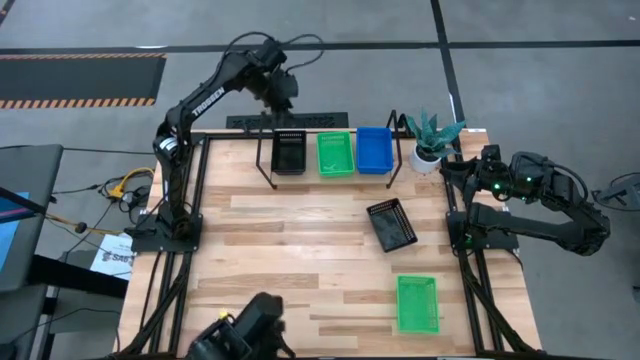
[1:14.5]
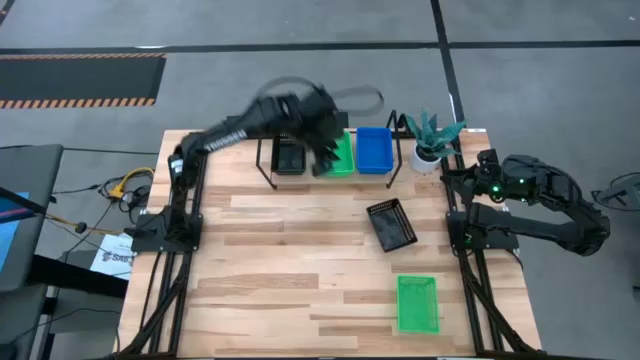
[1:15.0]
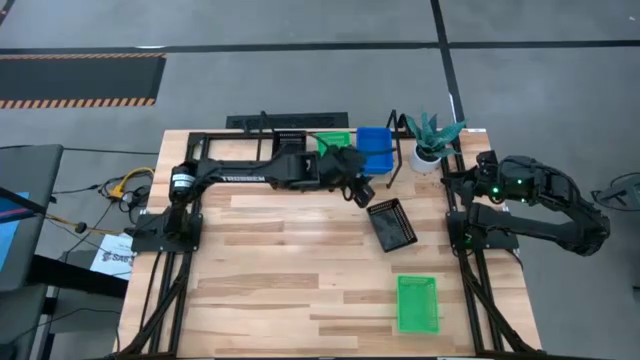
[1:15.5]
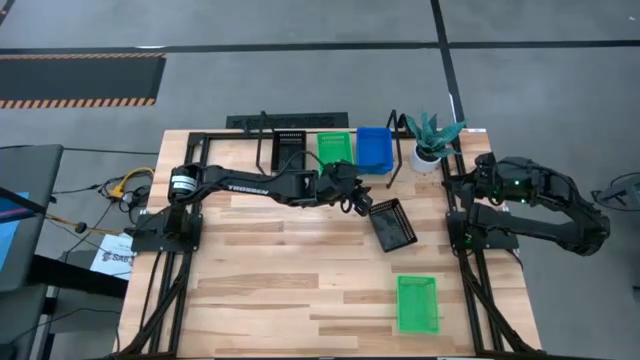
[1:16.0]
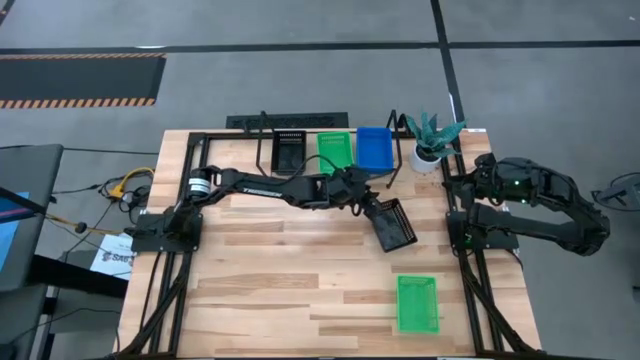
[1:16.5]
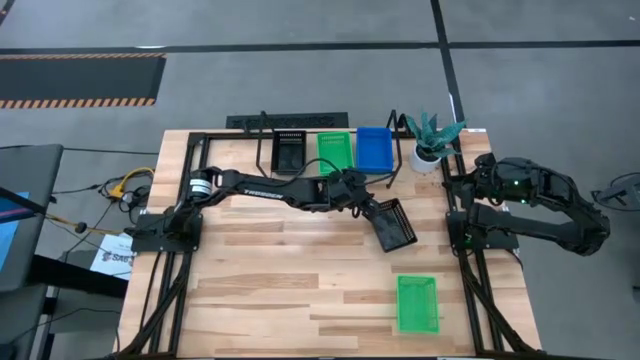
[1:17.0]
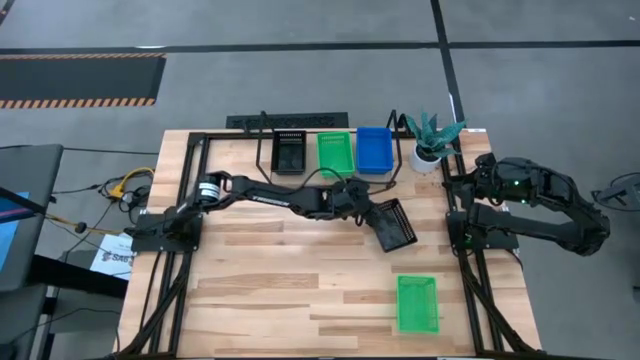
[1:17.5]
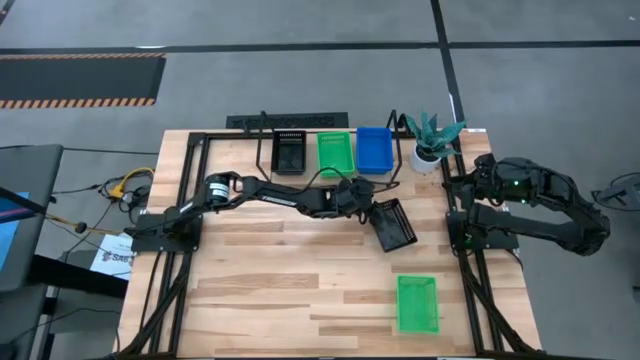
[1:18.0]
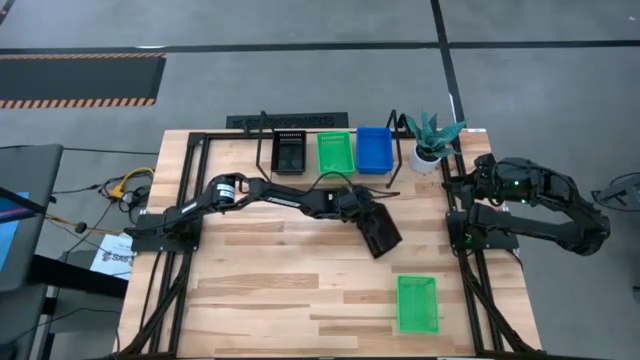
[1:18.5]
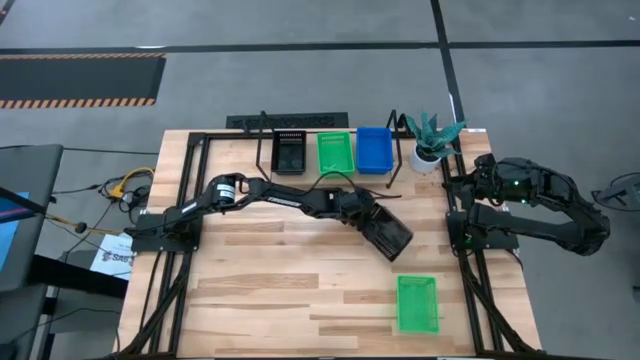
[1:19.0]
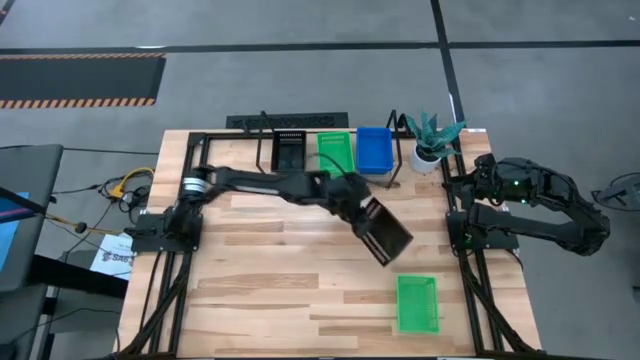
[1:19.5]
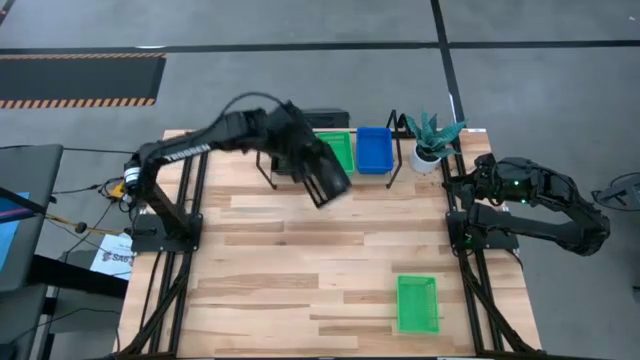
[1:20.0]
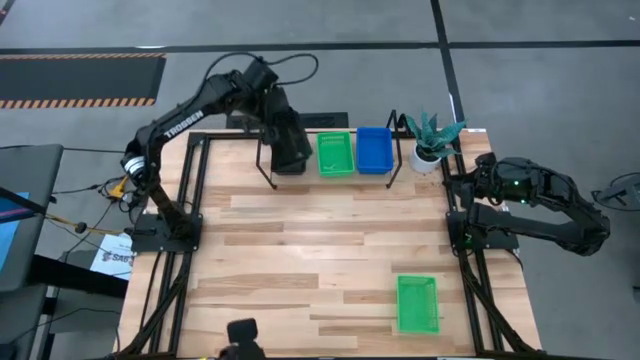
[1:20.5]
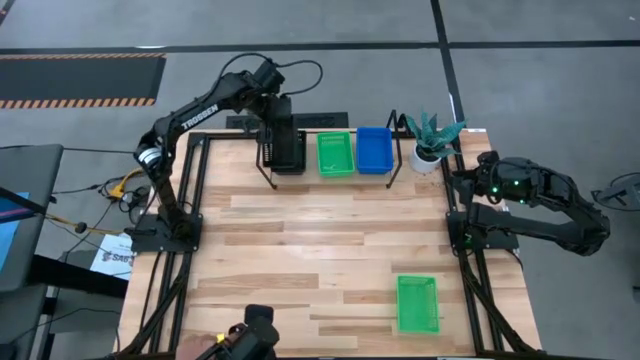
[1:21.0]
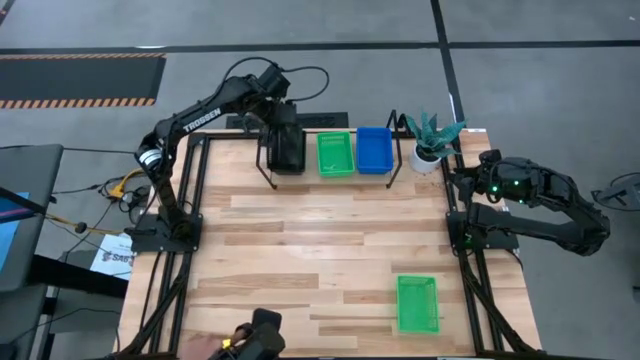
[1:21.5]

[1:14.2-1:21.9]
Task: Stack baskets on shelf by color
Stack the black bin on top of the other black bins on the shelf

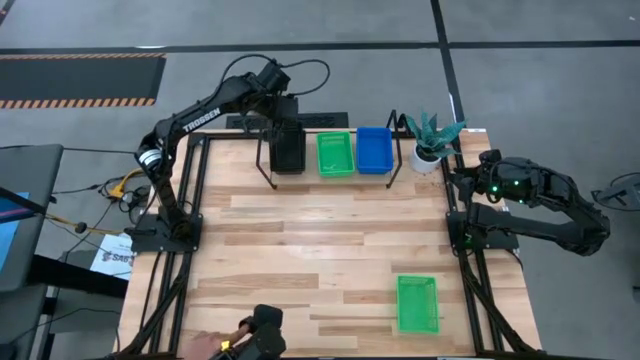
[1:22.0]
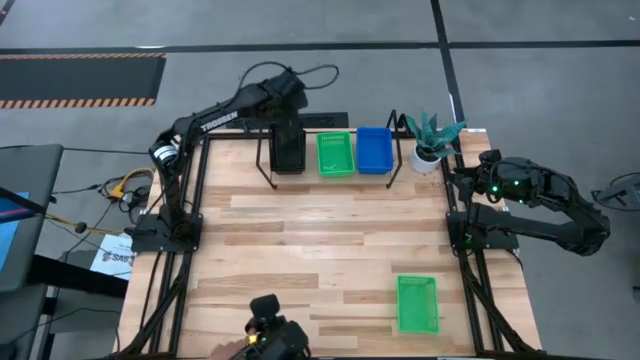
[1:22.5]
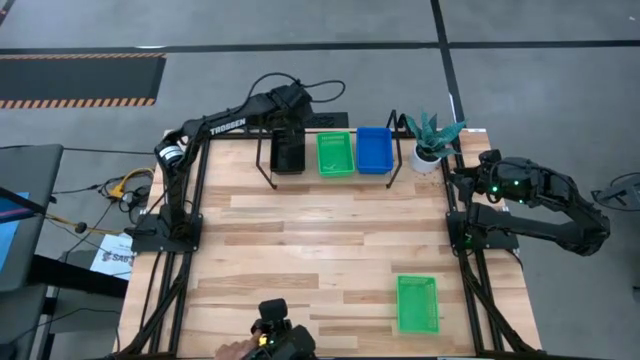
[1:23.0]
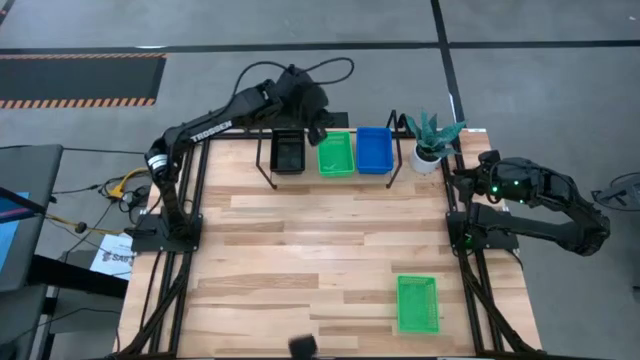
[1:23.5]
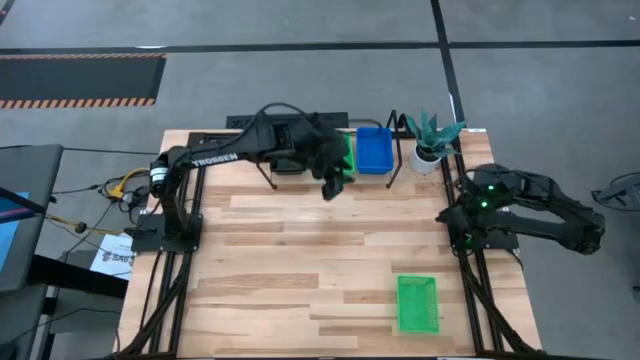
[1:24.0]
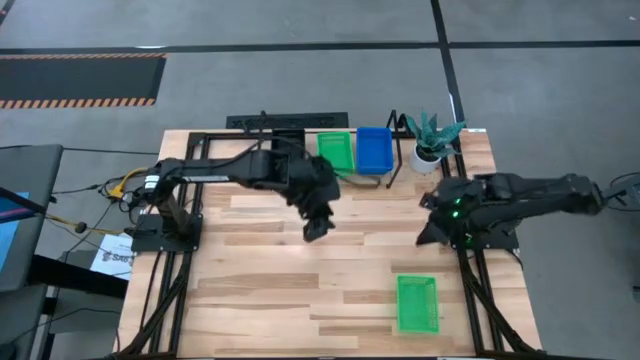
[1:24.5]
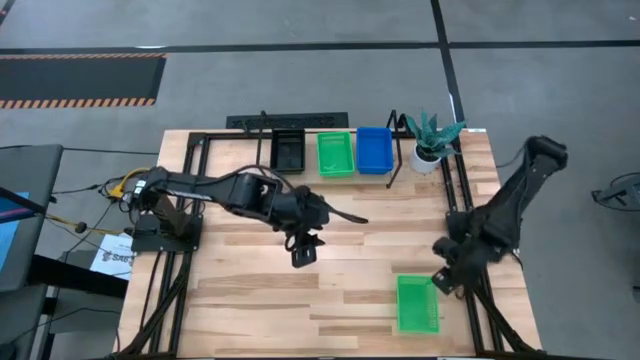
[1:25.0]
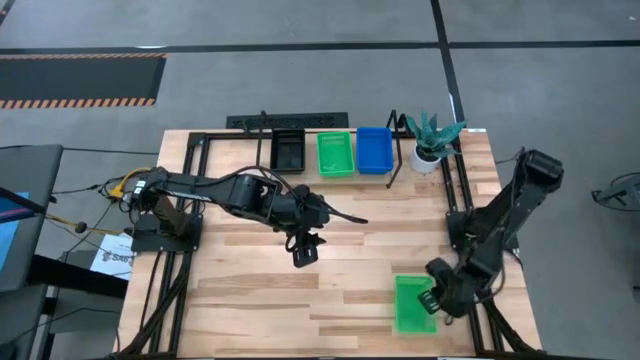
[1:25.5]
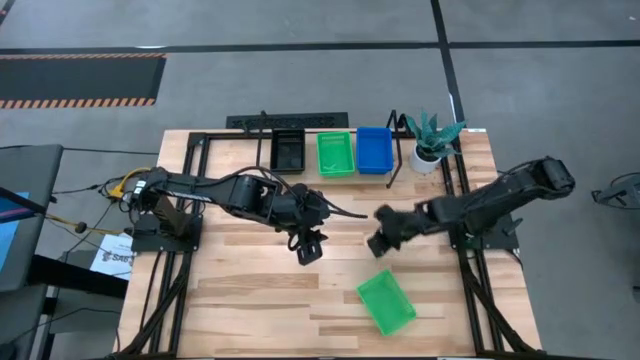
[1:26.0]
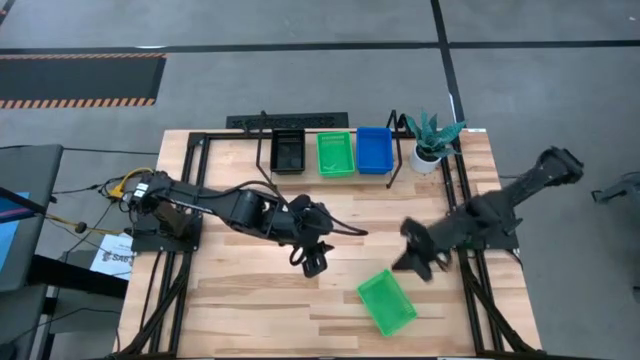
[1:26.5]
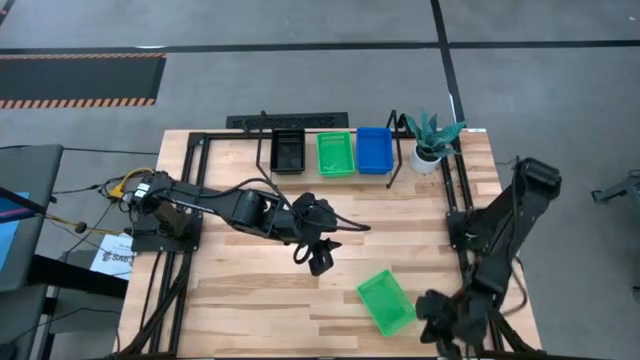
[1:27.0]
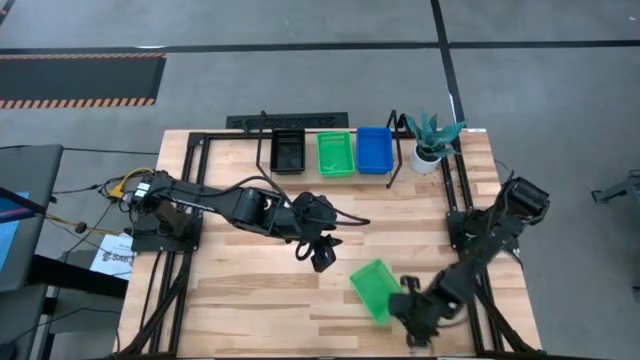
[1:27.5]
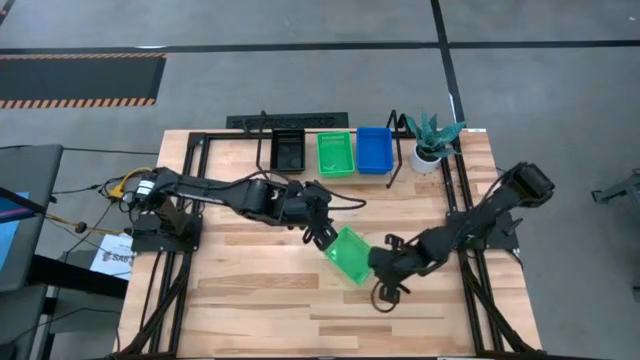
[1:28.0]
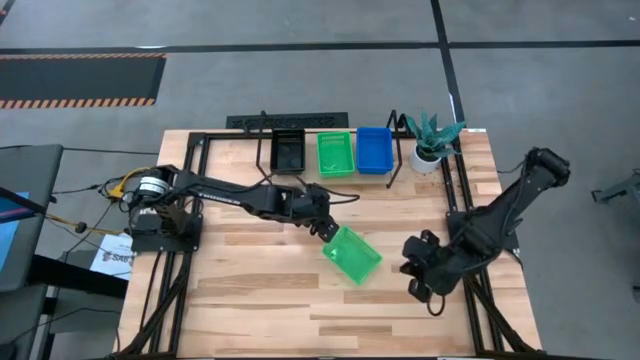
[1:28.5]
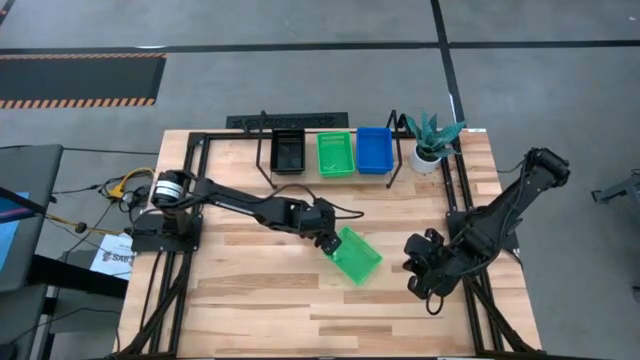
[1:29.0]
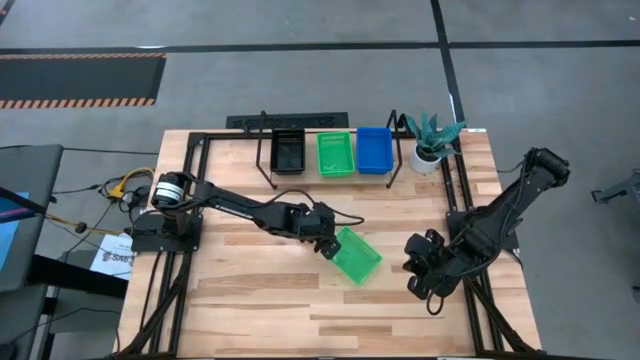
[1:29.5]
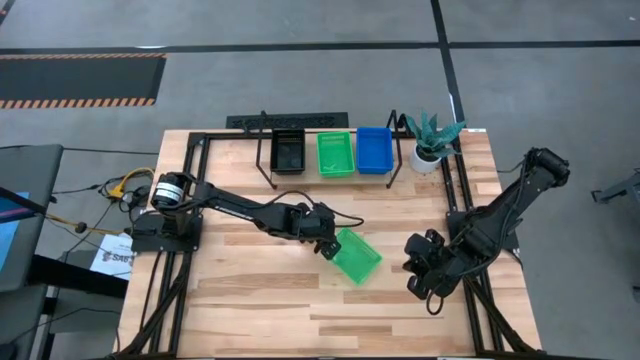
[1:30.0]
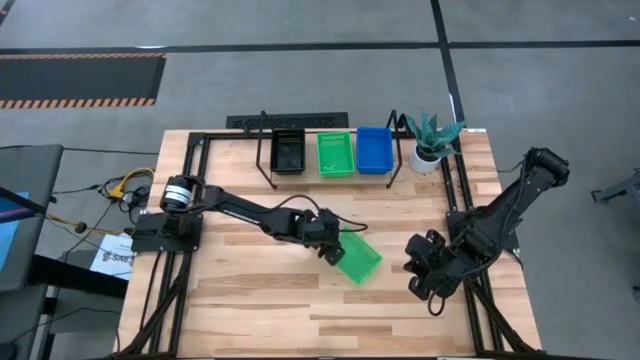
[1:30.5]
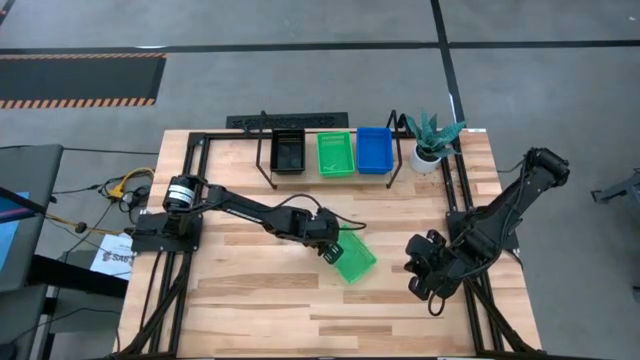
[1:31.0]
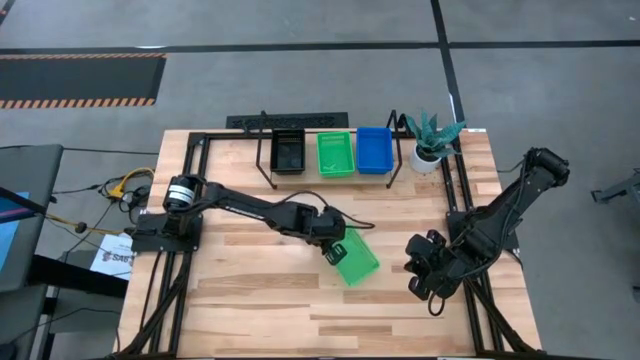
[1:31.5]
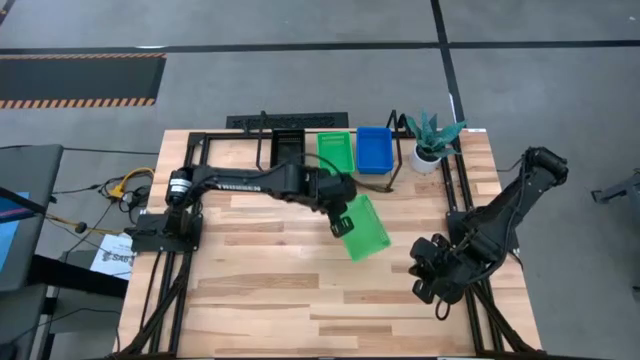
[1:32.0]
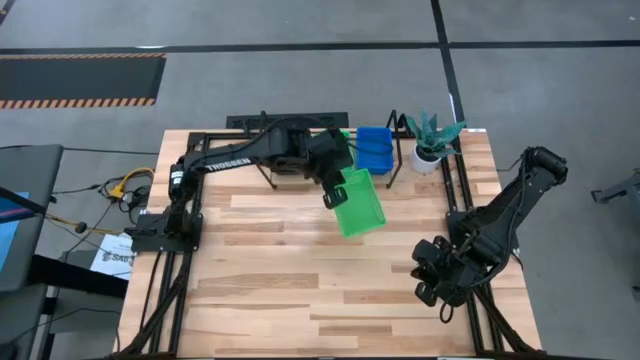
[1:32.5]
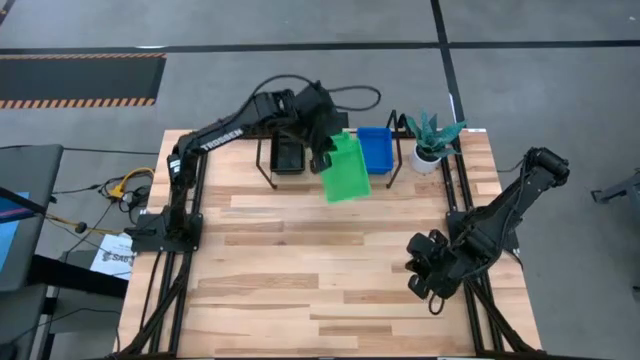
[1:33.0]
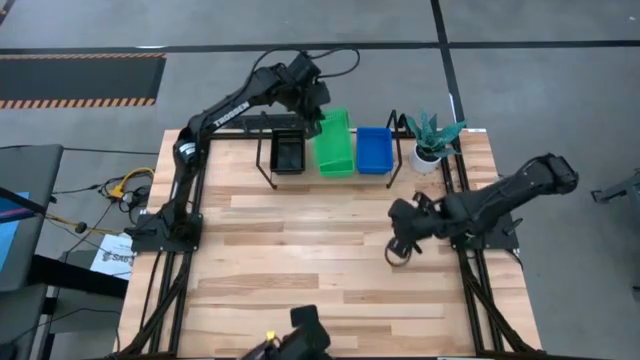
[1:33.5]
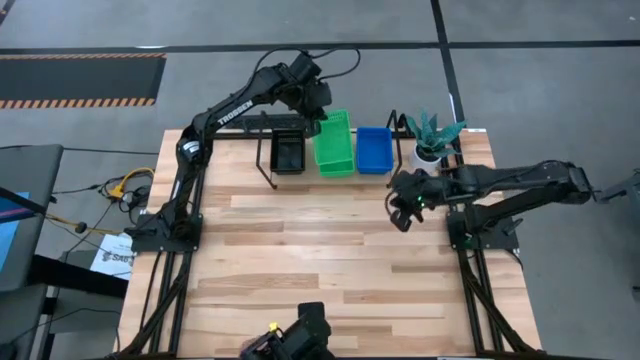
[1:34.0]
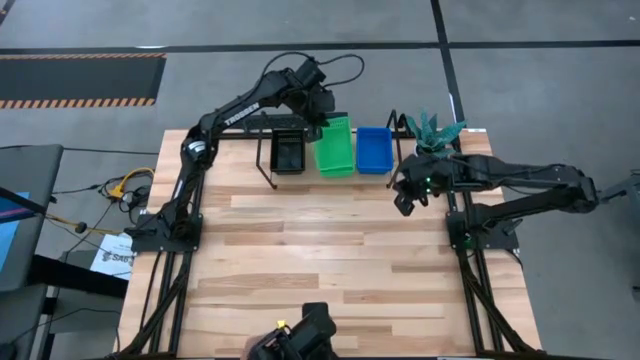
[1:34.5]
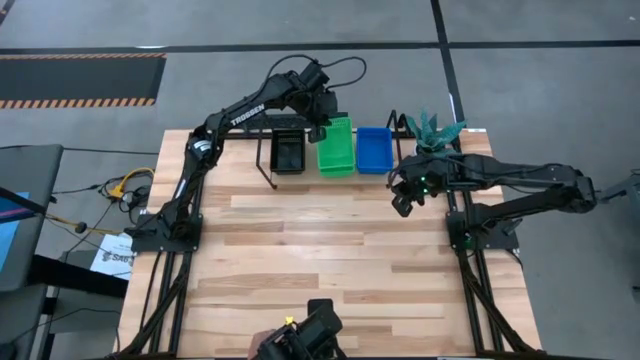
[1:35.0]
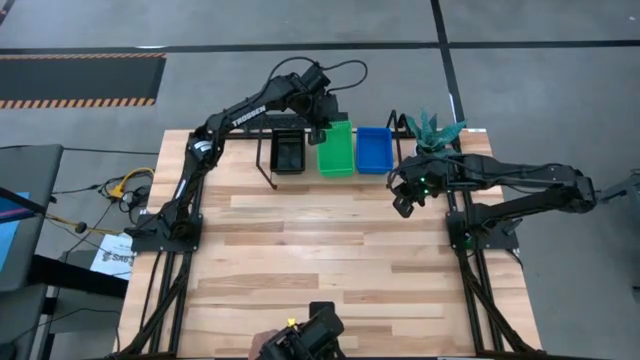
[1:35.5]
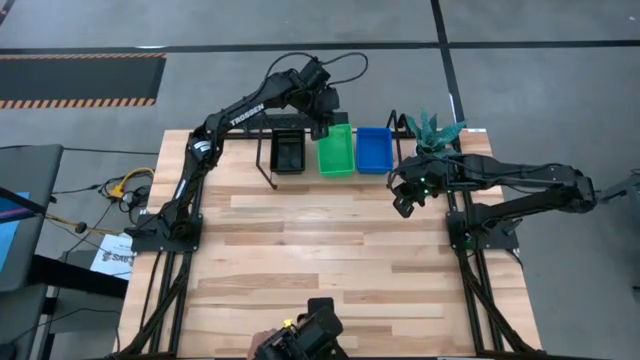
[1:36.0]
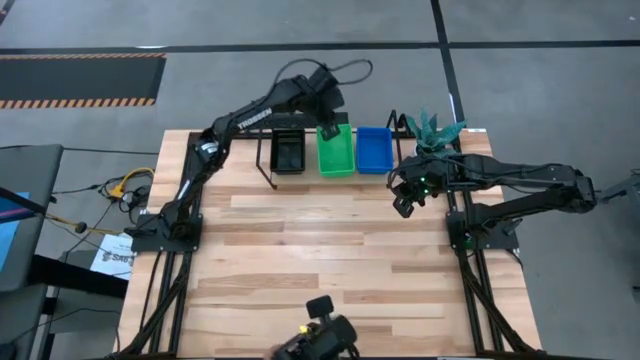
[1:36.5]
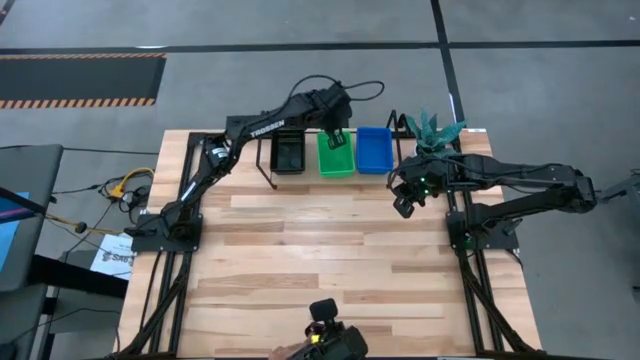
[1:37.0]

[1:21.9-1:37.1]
Stack the green bin on top of the other green bins on the shelf
